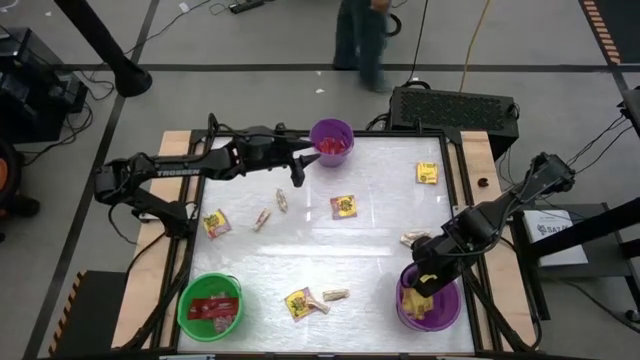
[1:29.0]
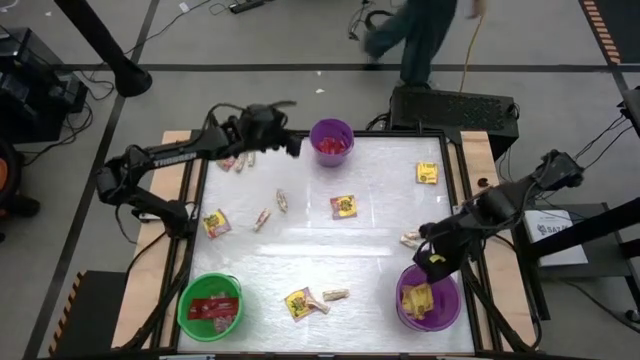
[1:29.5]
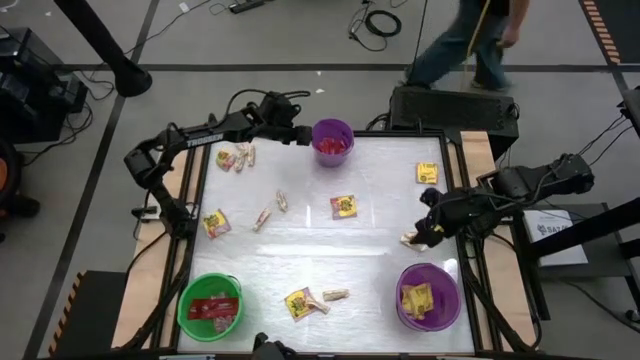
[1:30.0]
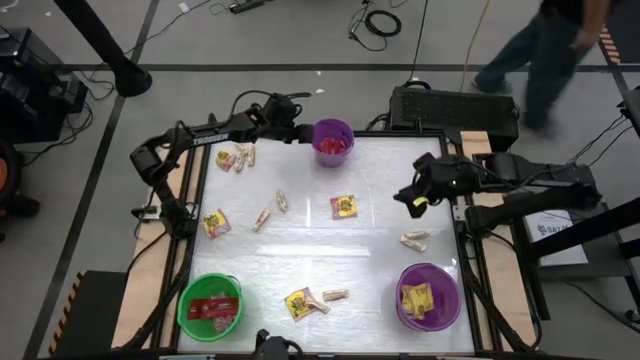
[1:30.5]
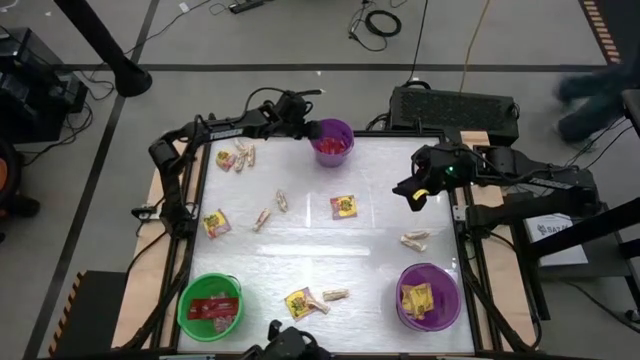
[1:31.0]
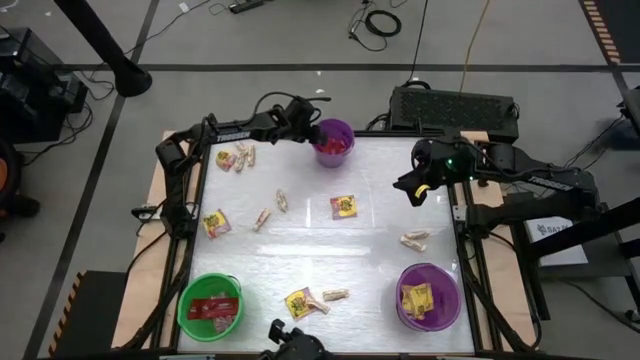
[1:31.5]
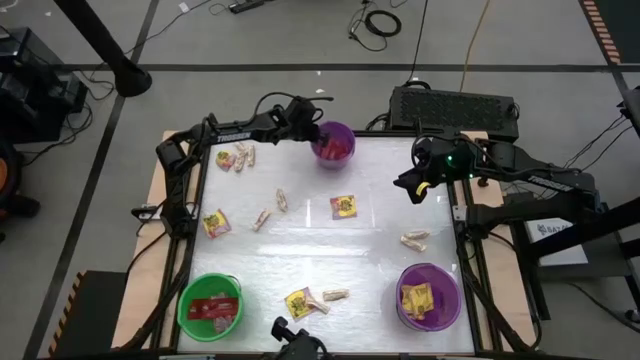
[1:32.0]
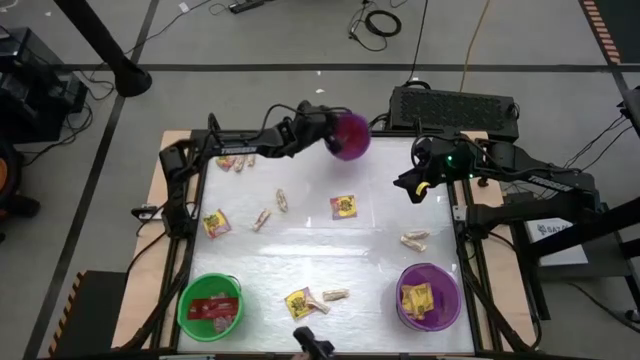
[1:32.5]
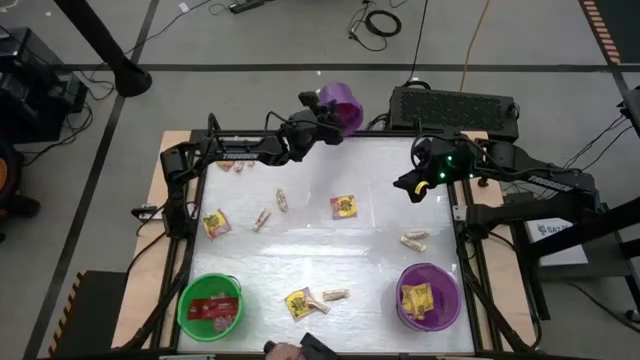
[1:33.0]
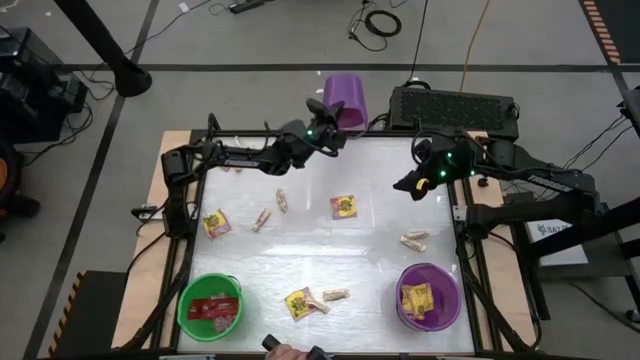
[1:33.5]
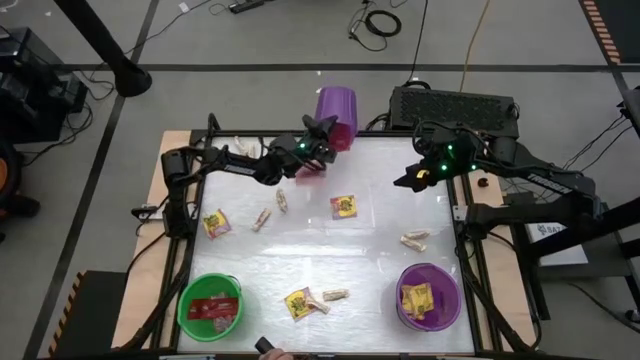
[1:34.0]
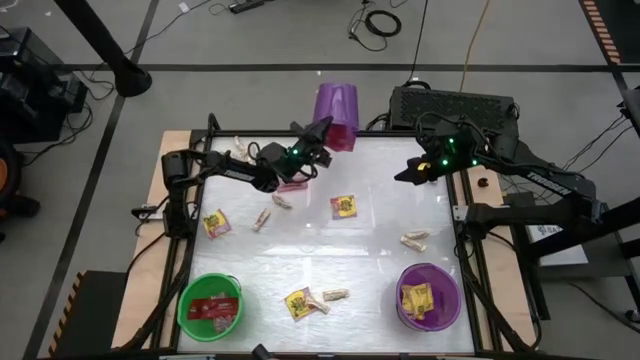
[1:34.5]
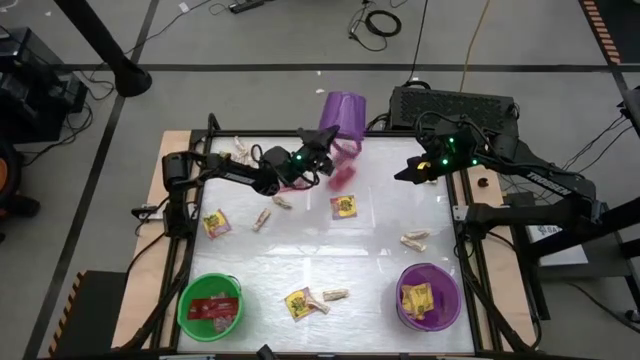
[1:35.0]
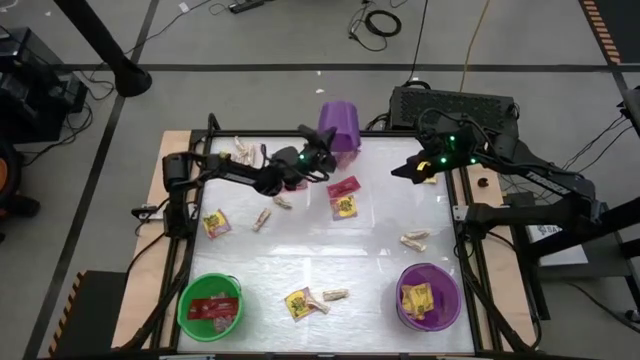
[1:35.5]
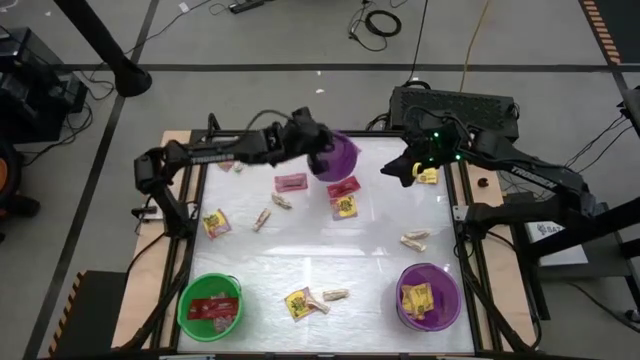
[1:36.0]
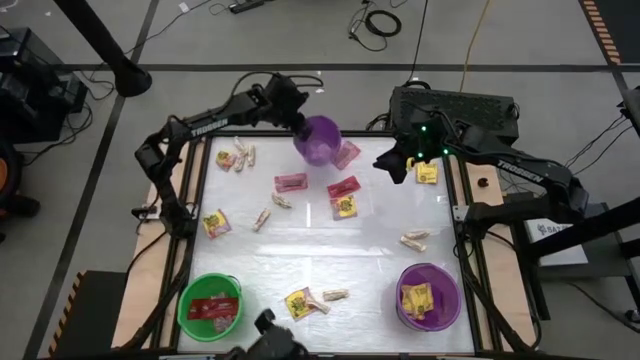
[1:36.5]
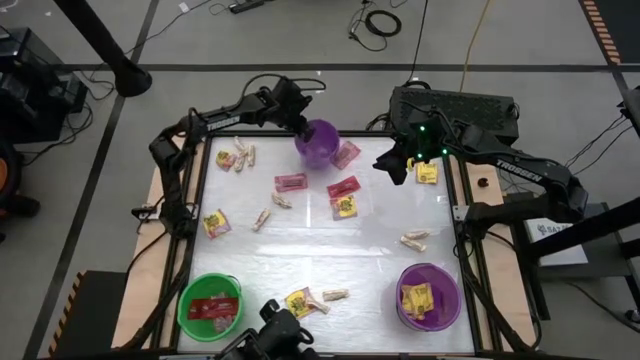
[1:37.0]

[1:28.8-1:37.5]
Task: Sort candy by brand, put in halloween buckets
Remove the red candies from the top purple bucket

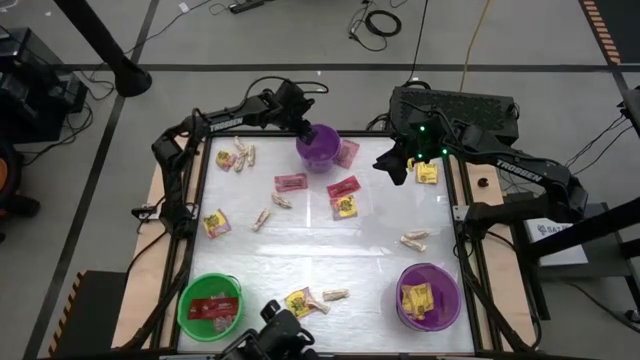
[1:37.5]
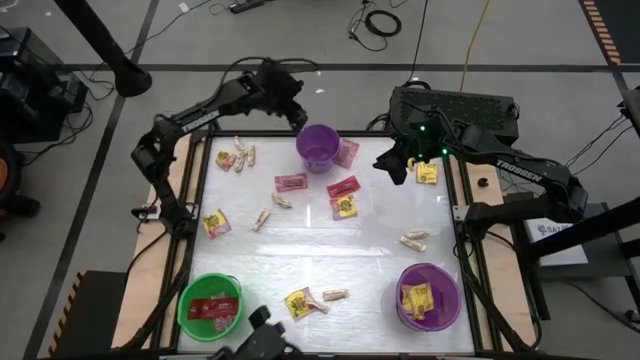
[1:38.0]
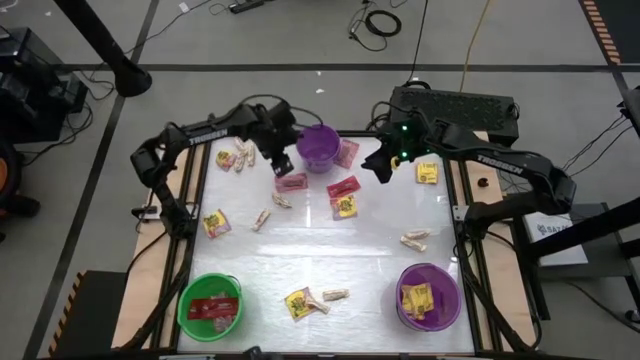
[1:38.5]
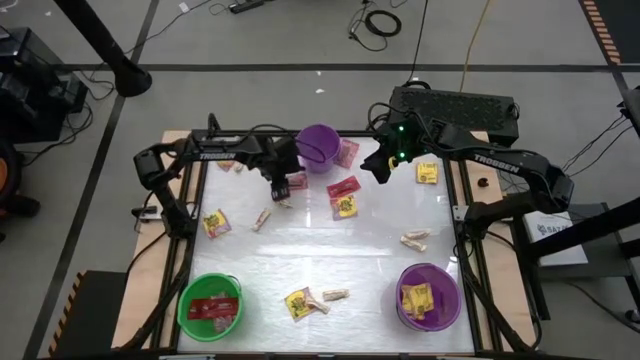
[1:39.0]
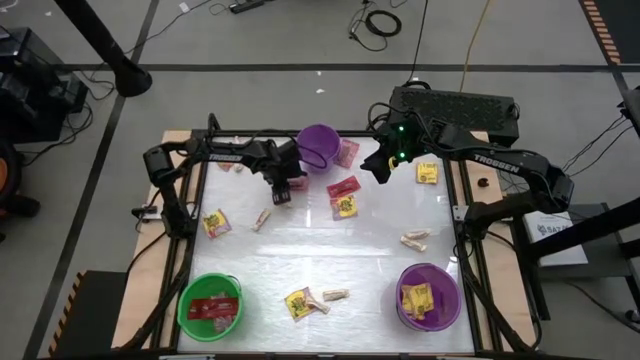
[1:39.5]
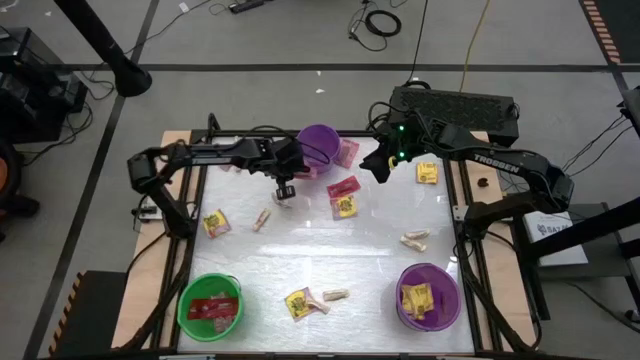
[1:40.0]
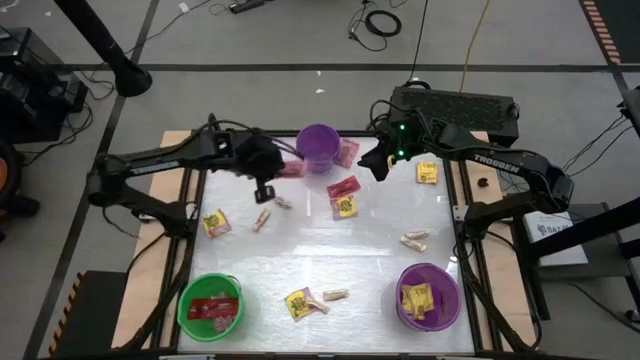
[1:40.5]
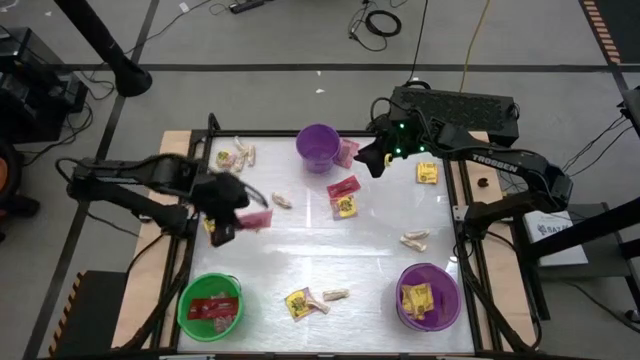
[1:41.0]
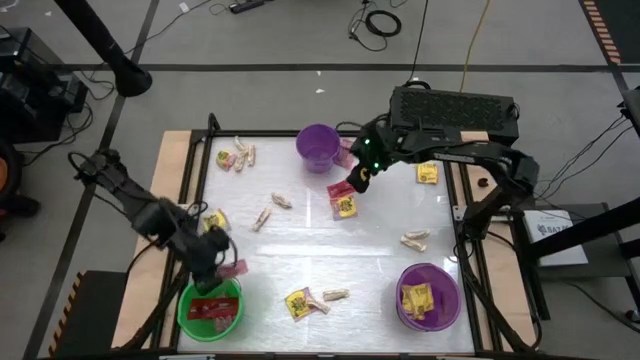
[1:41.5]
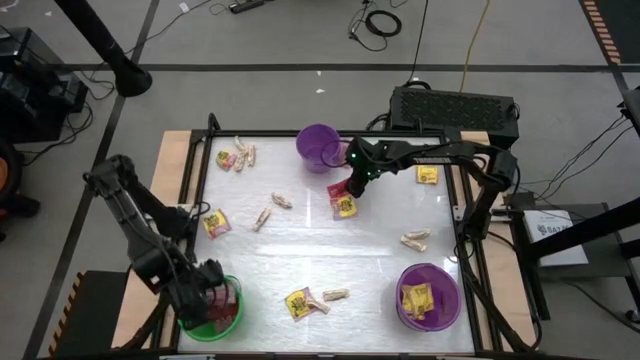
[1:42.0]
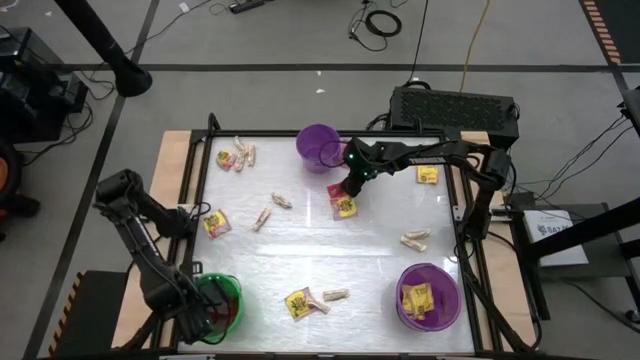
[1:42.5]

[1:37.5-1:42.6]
Put the red candy into the green bucket

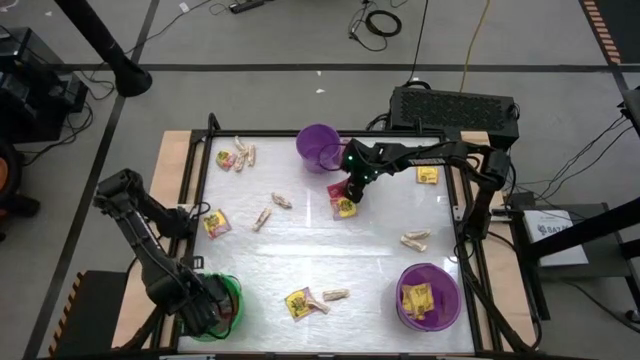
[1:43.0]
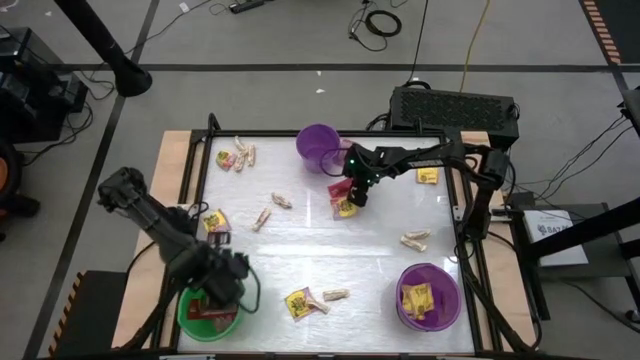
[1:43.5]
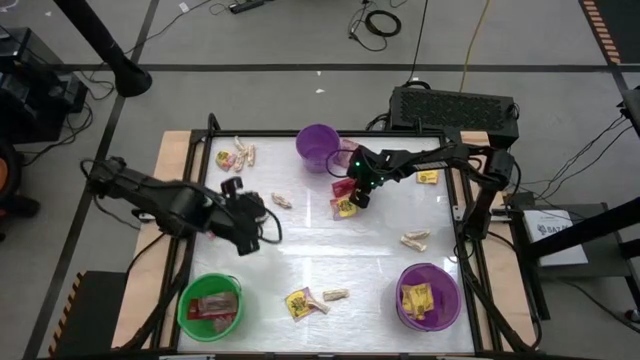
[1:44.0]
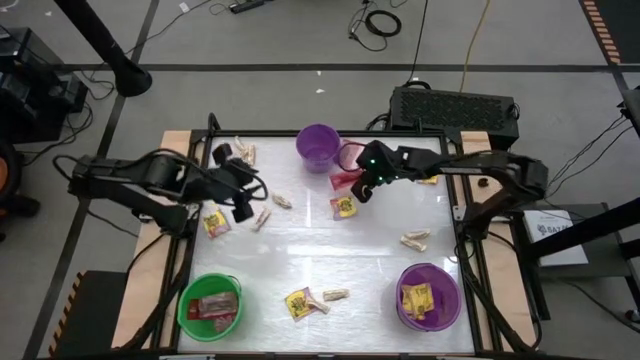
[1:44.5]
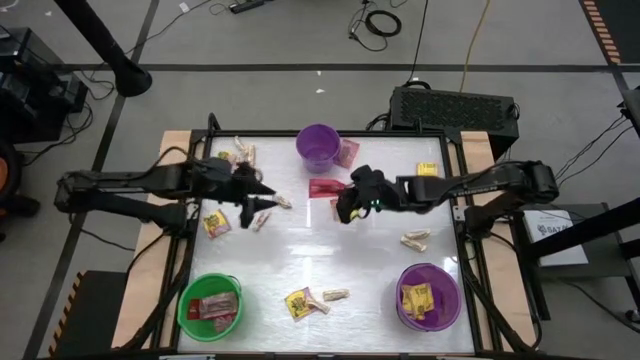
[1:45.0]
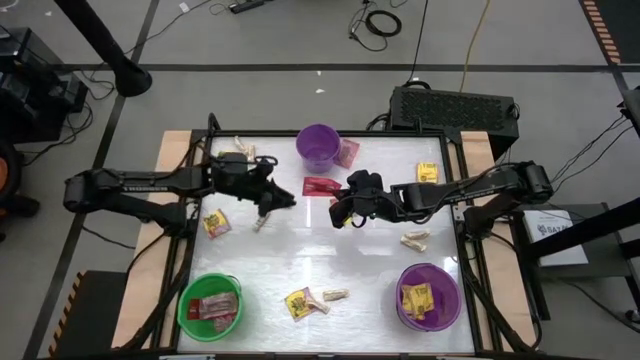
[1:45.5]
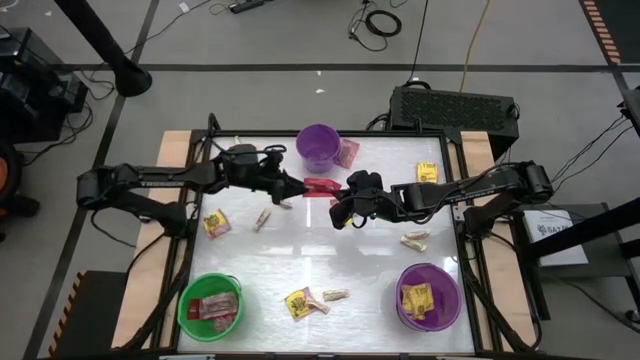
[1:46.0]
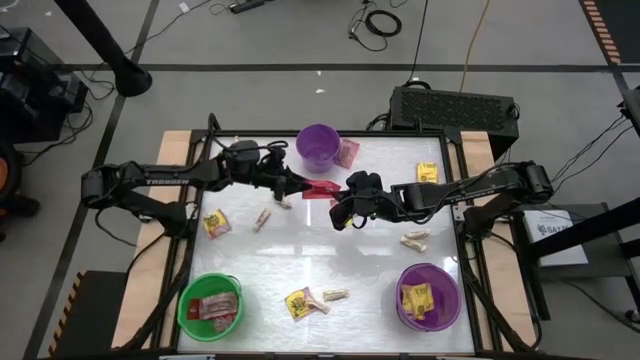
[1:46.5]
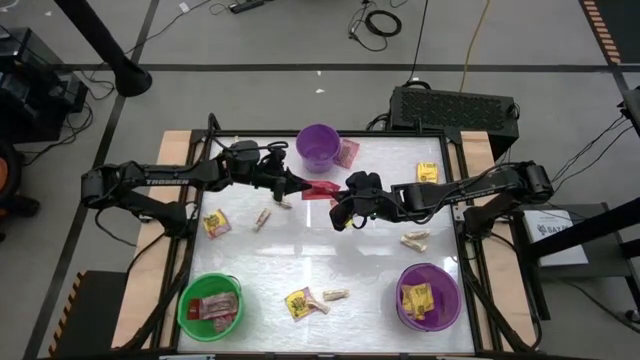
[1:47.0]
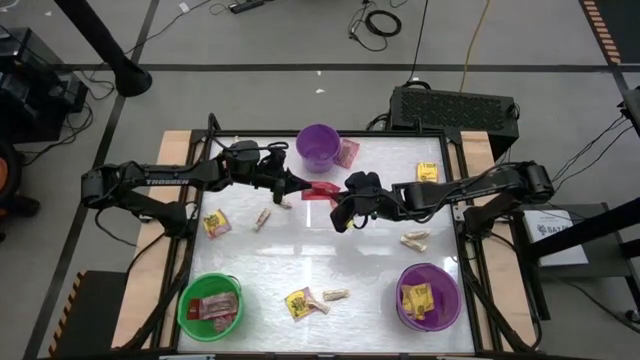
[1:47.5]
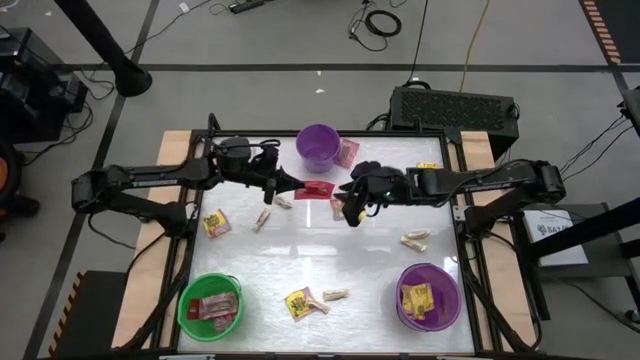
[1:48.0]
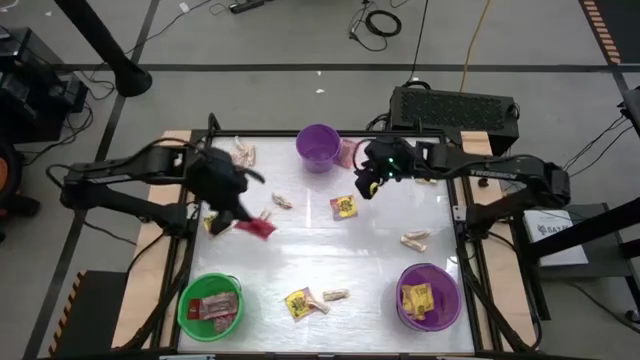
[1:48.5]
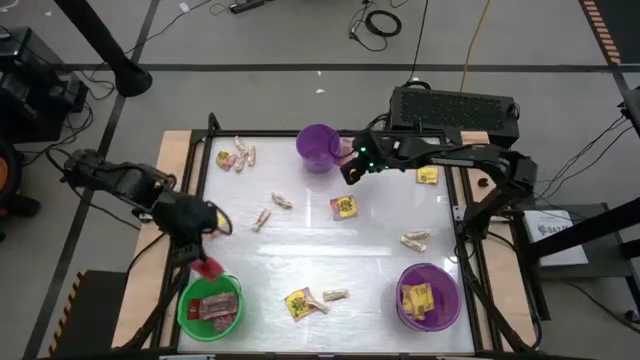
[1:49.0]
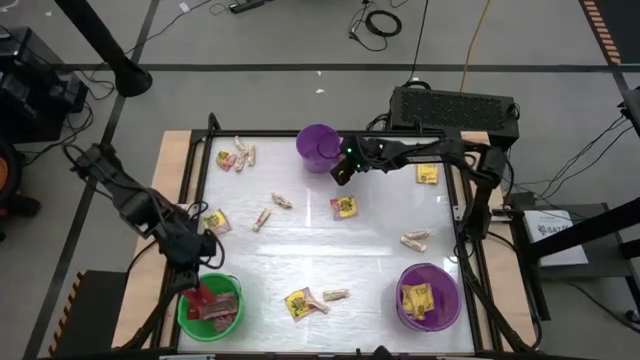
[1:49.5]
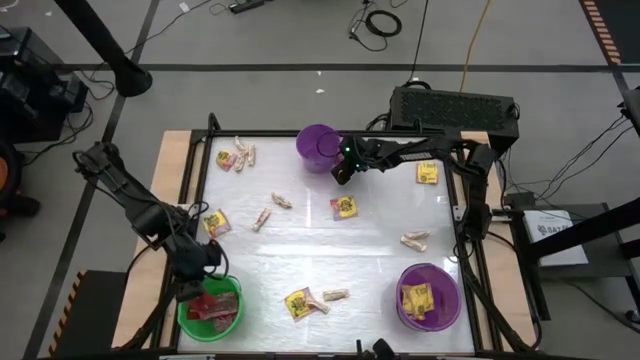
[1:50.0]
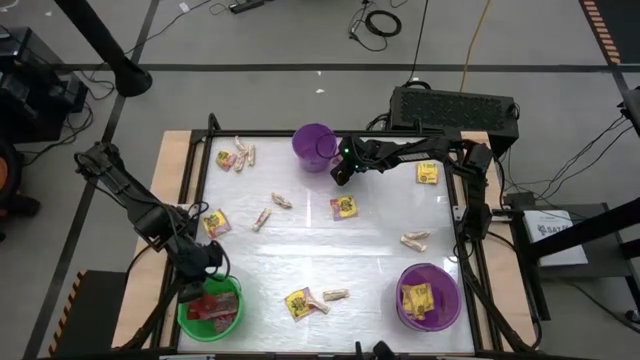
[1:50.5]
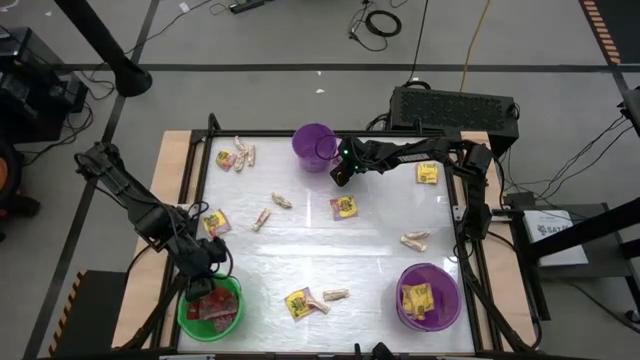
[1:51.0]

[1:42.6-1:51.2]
Put the red candy into the green bucket

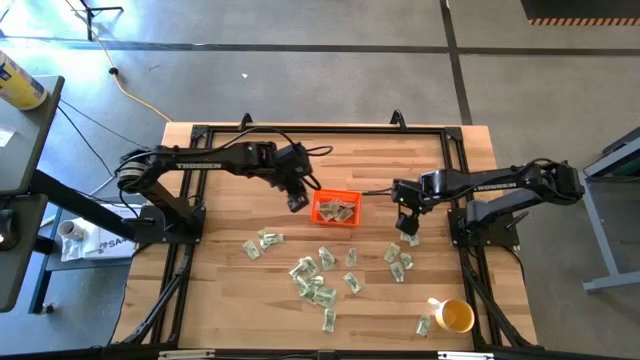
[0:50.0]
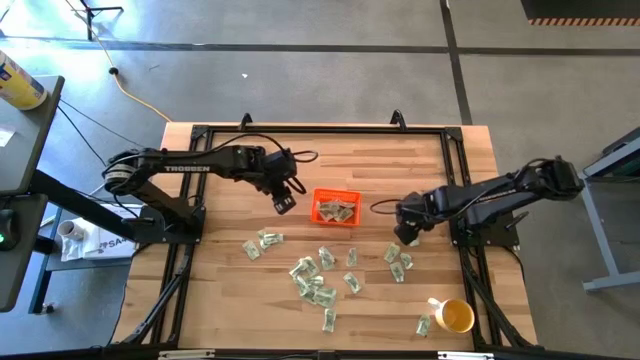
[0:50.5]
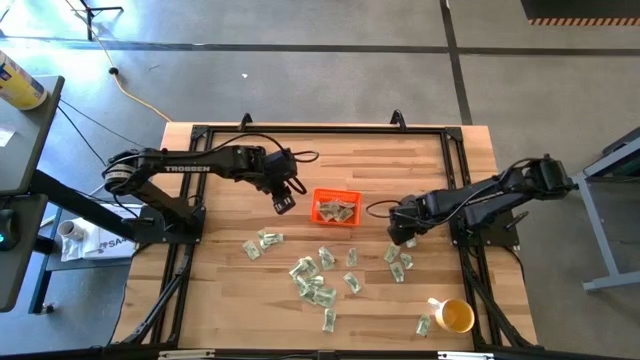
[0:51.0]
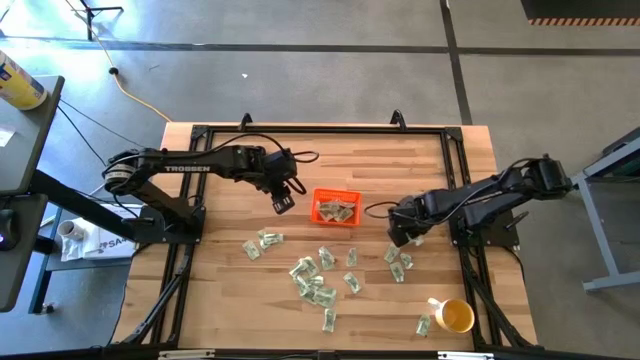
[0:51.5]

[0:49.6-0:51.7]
Task: Pick and place Stevia / Truvia into bins
Put the stevia packet into the orange bin
